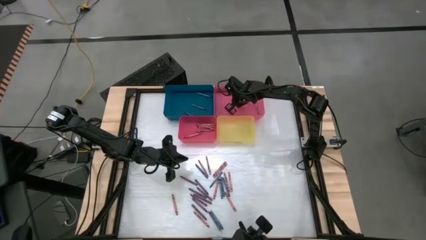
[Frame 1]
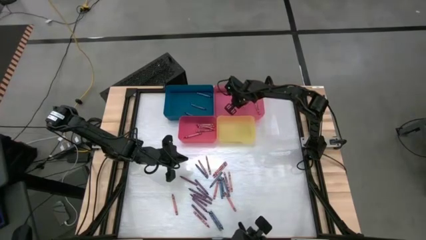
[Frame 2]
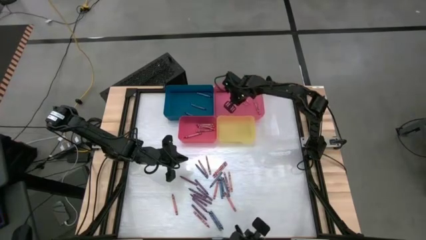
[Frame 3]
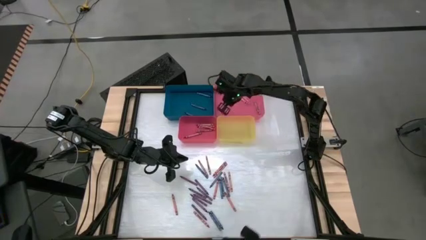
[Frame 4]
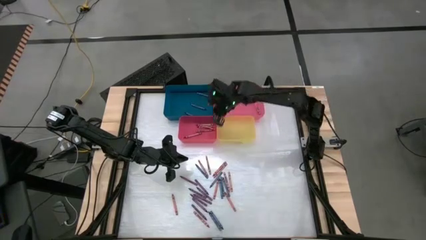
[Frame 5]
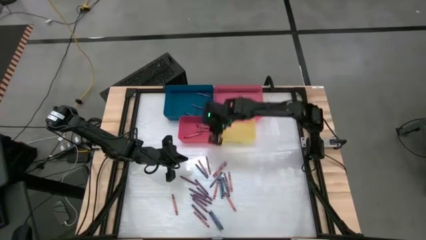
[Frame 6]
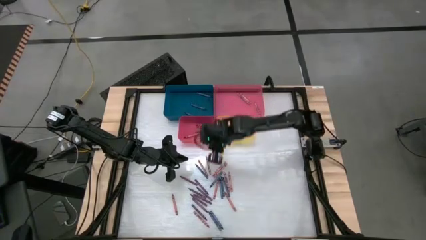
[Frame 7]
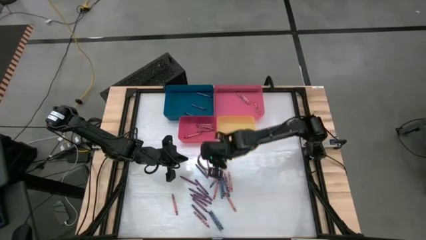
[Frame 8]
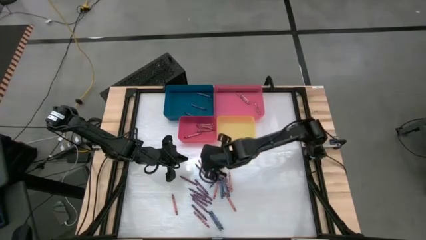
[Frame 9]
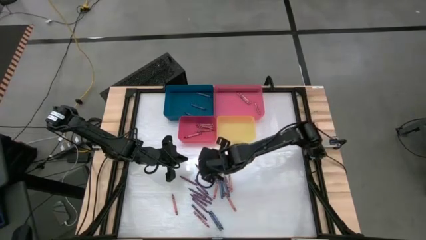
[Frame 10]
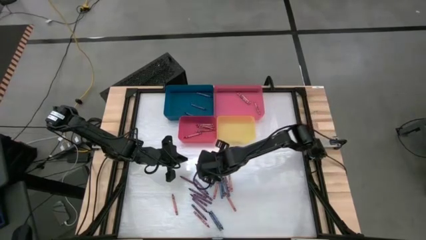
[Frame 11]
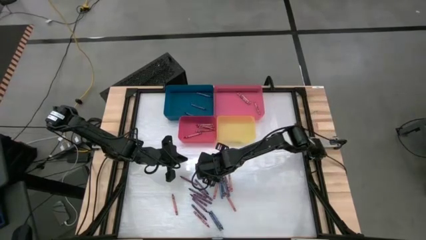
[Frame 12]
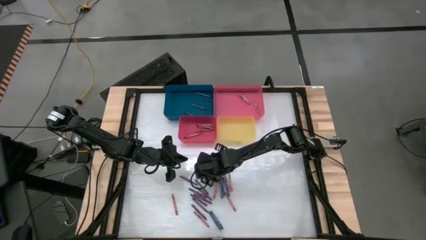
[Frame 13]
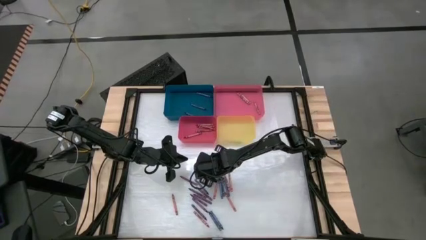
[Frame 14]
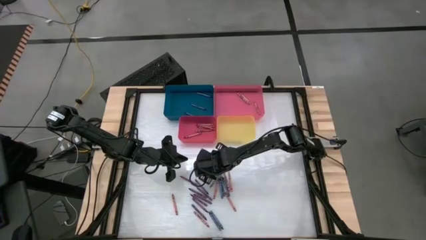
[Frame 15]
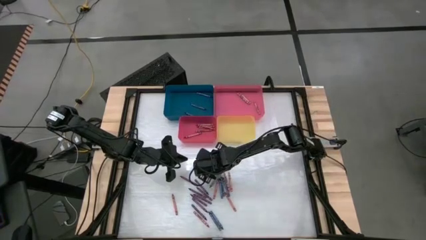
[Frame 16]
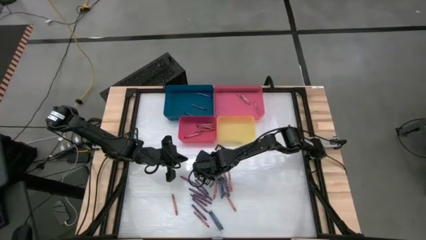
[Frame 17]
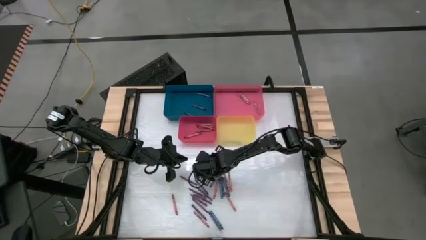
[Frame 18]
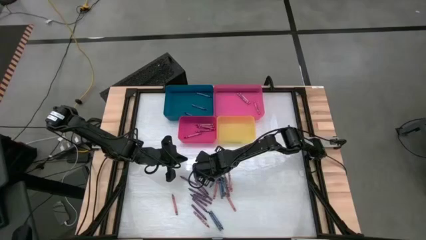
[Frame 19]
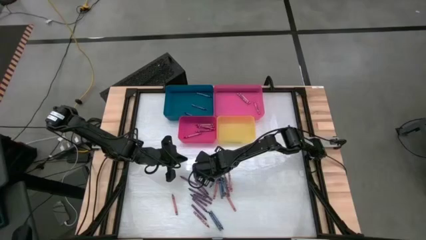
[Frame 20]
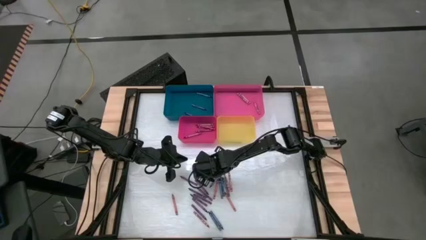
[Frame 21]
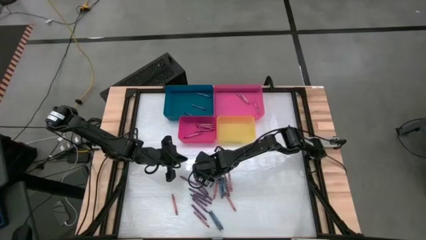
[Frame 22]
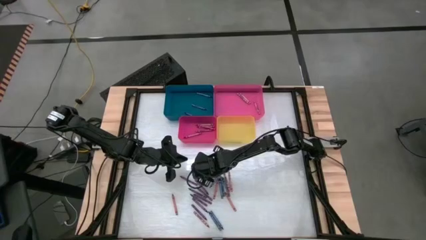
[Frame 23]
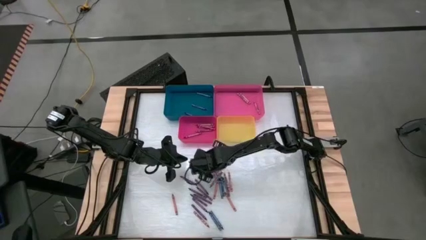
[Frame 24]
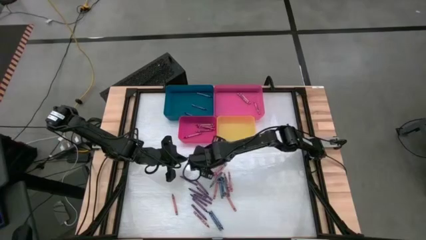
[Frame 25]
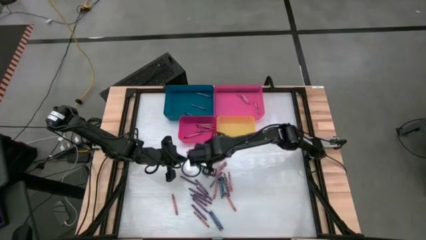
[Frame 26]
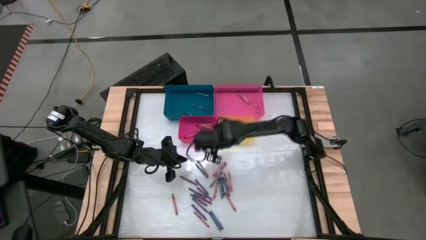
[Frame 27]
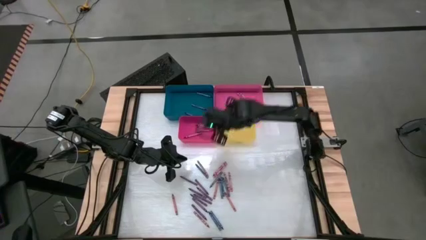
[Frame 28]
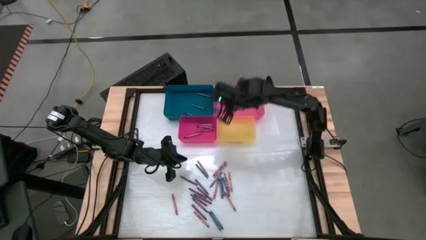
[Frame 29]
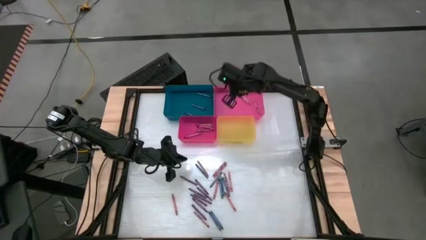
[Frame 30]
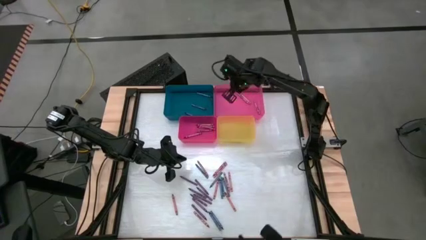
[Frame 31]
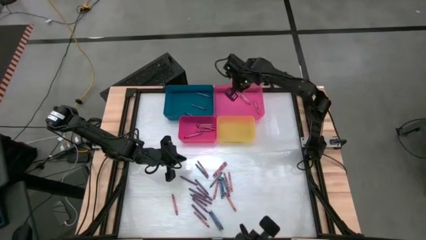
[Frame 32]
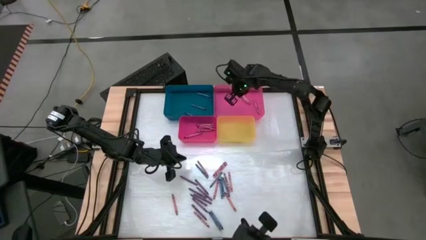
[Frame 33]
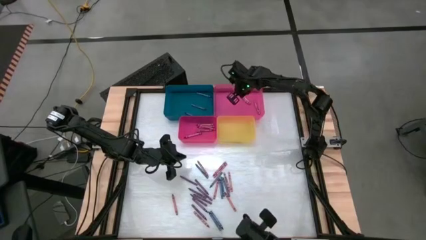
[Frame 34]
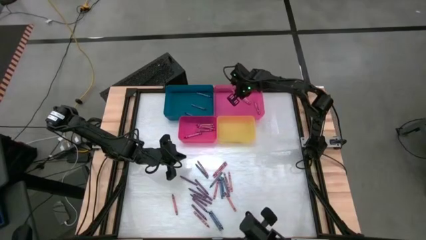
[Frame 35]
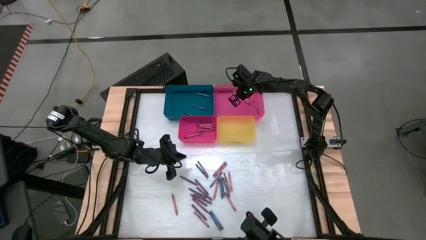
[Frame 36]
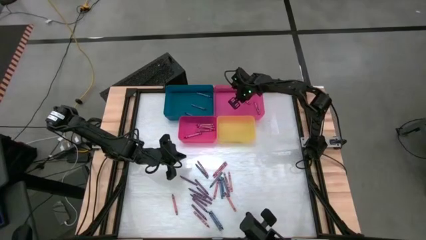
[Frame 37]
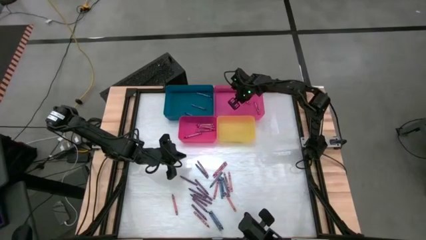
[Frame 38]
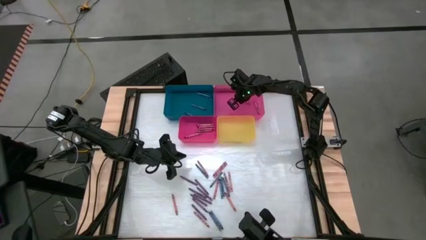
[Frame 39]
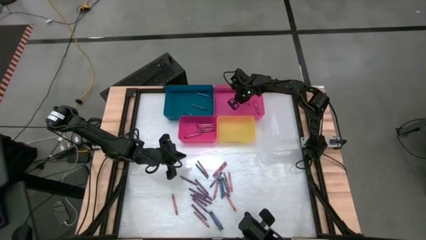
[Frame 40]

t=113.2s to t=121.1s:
Task: Sort crayons
Put the pink crayon into the pink bin

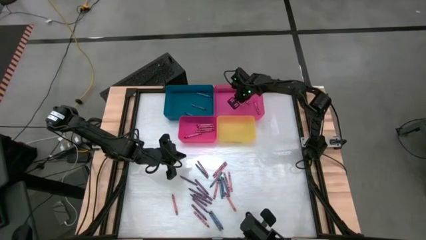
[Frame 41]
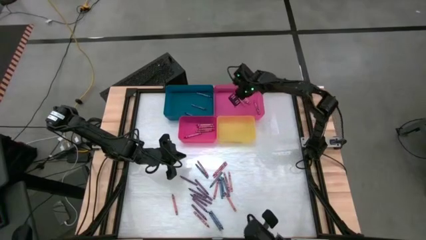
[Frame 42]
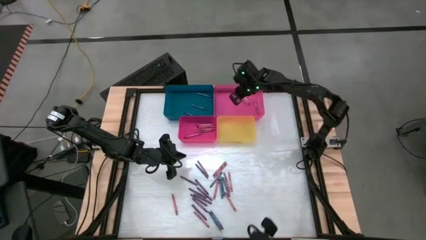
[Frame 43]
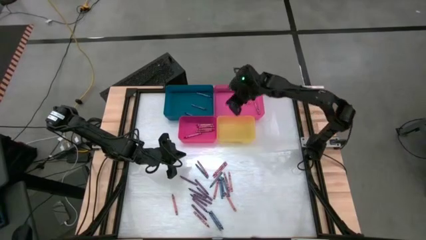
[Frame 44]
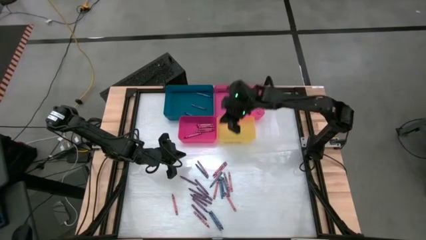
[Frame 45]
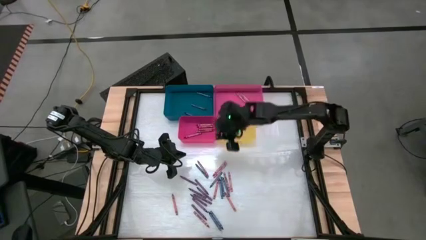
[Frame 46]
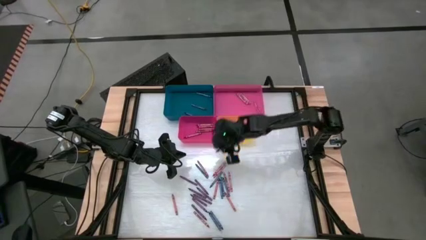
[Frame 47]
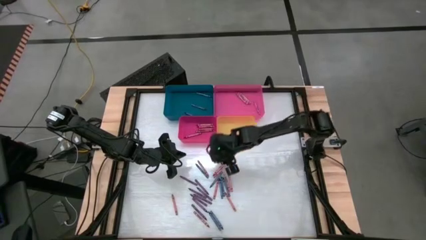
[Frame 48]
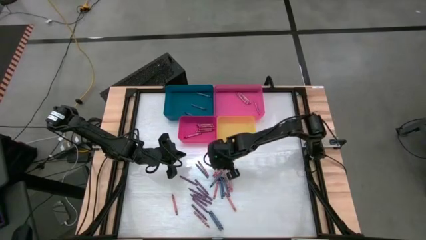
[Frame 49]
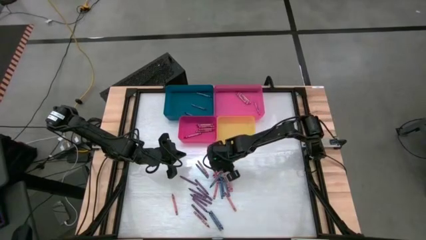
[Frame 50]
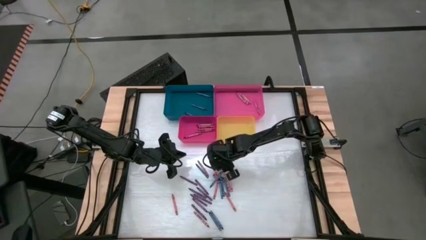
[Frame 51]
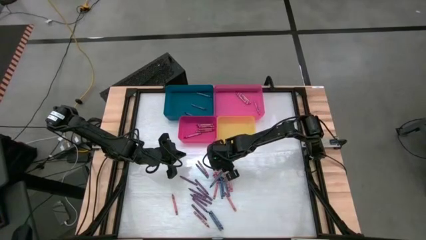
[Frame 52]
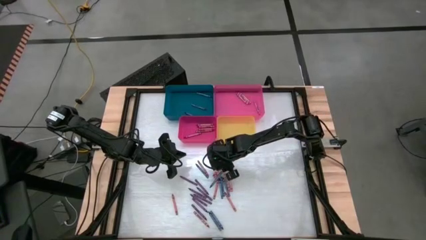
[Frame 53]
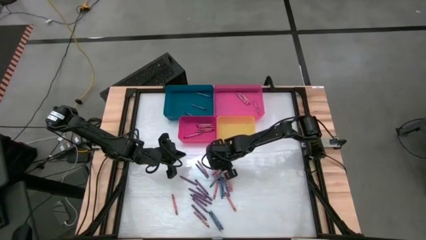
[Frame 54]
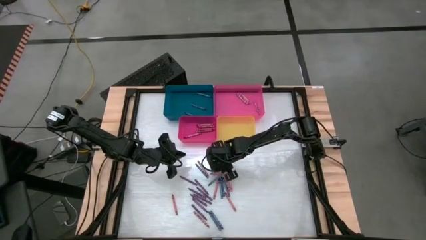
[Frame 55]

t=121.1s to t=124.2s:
Put the red crayon into the red bin

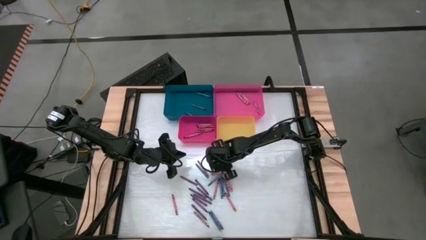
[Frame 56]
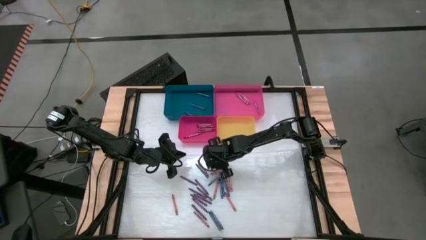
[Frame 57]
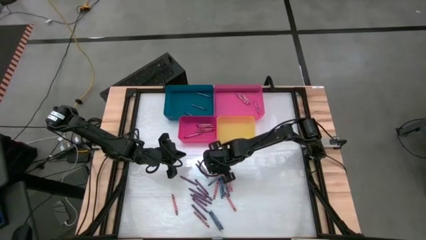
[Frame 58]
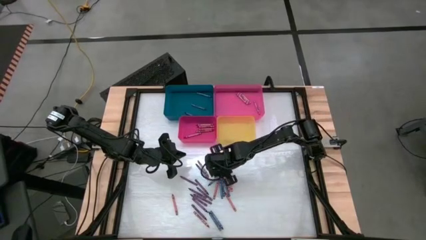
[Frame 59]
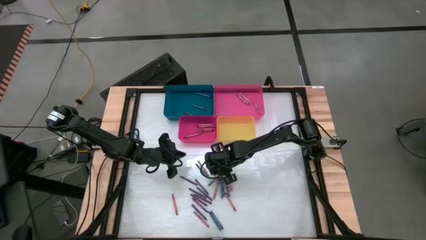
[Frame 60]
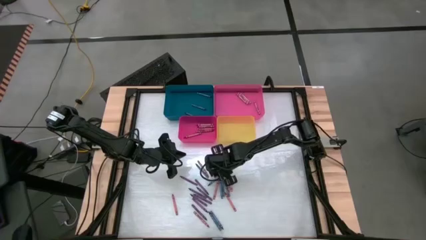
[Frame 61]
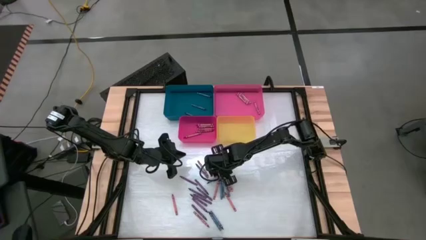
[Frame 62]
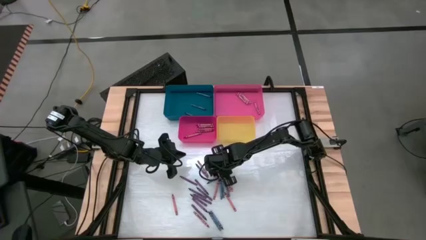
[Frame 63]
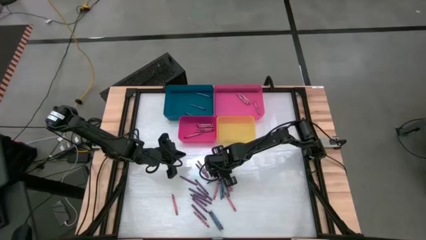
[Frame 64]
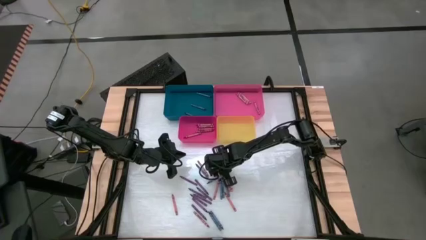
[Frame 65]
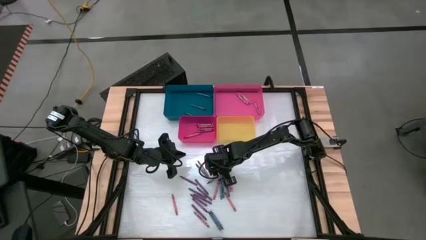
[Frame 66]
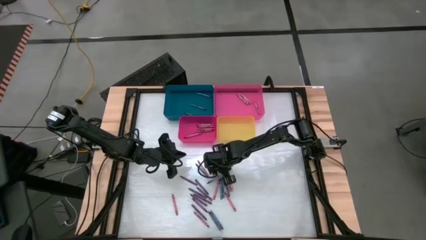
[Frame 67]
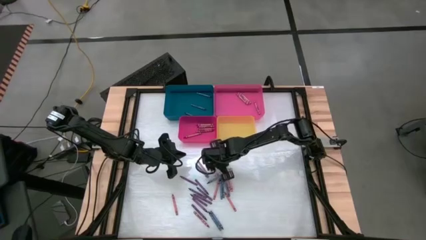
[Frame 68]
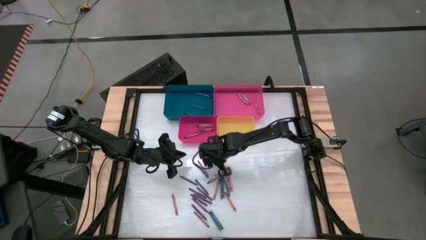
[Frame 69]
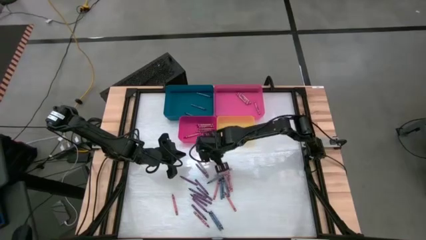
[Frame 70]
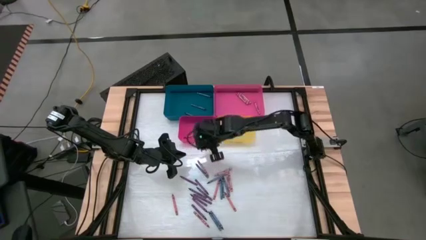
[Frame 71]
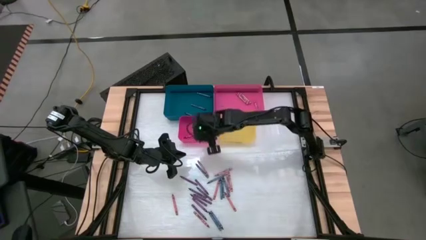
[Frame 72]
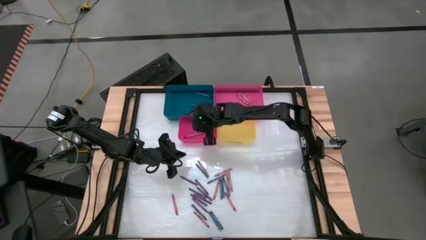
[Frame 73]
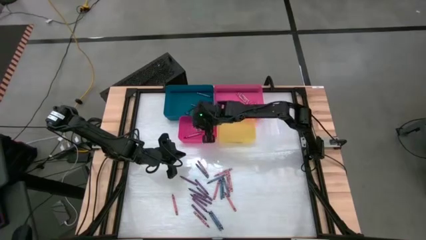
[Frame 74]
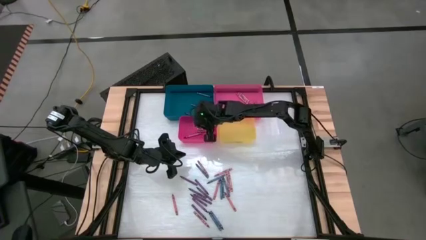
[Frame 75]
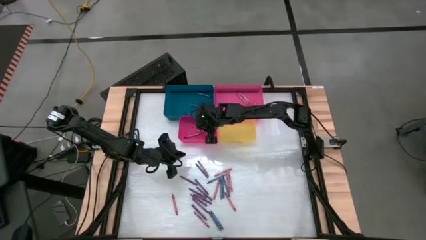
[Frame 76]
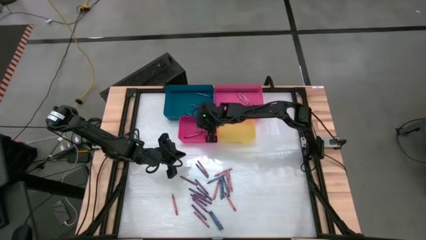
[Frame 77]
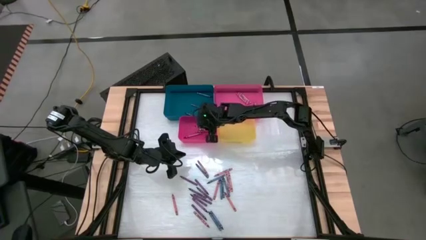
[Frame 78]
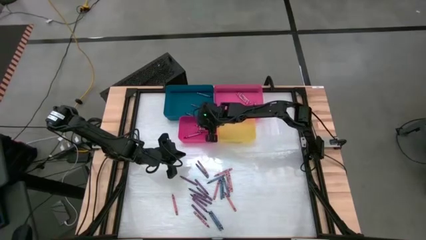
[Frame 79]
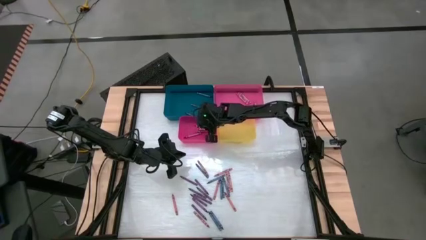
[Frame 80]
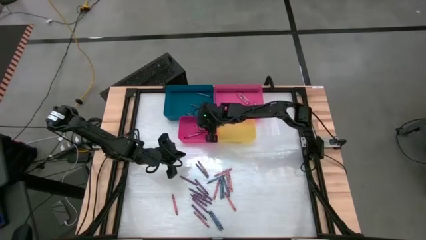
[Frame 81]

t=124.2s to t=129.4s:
Put the red crayon into the red bin
